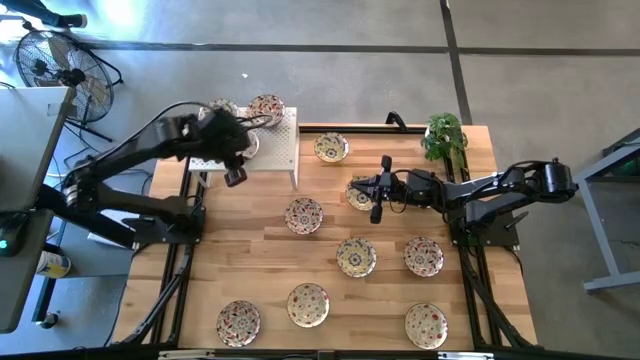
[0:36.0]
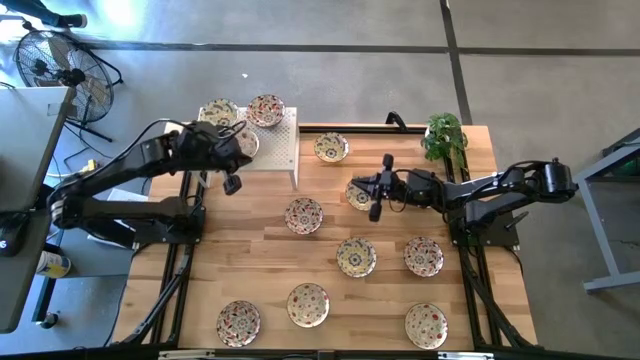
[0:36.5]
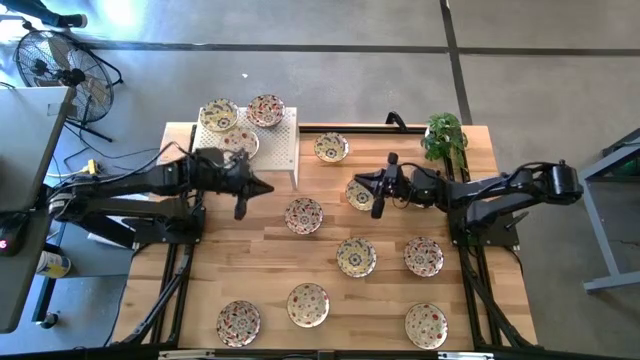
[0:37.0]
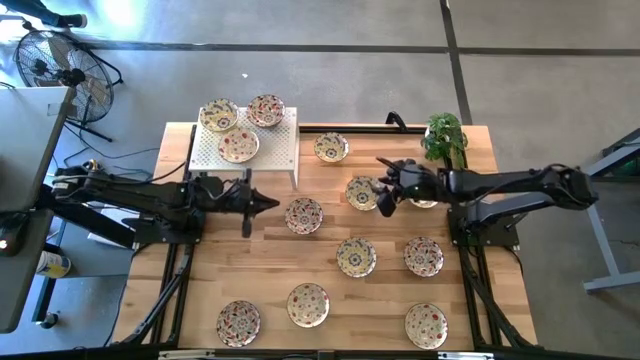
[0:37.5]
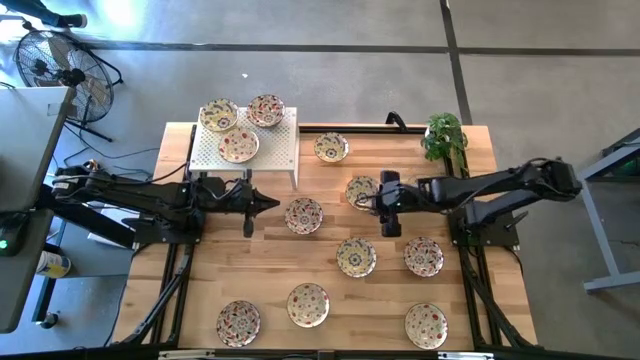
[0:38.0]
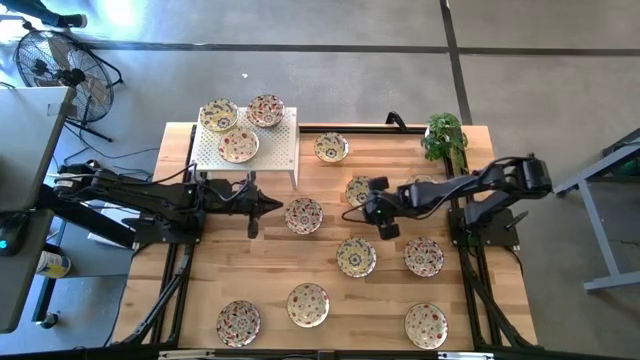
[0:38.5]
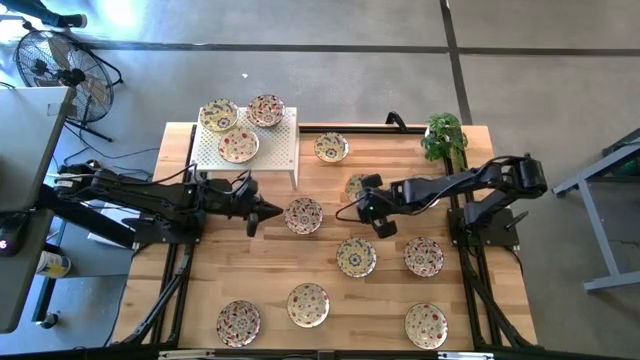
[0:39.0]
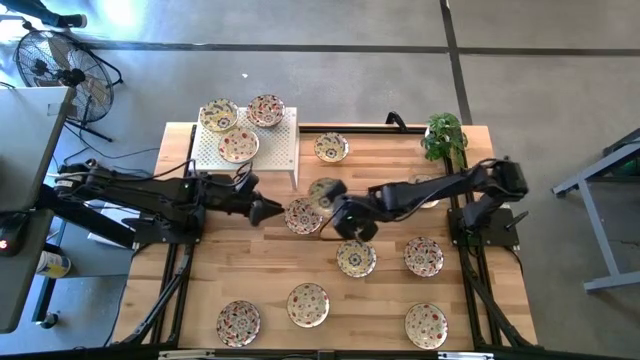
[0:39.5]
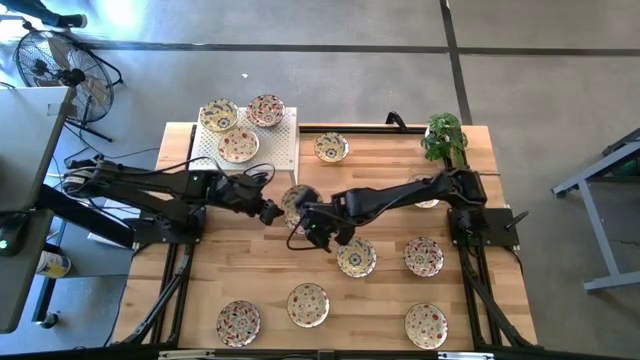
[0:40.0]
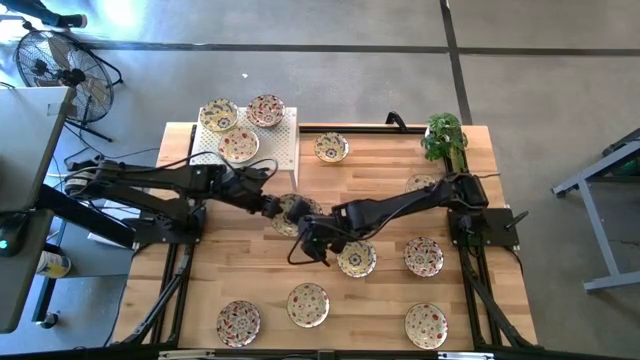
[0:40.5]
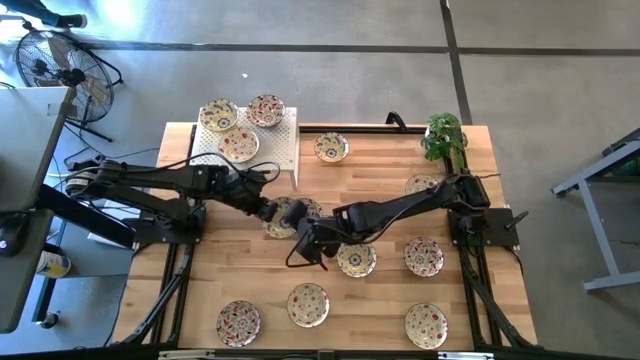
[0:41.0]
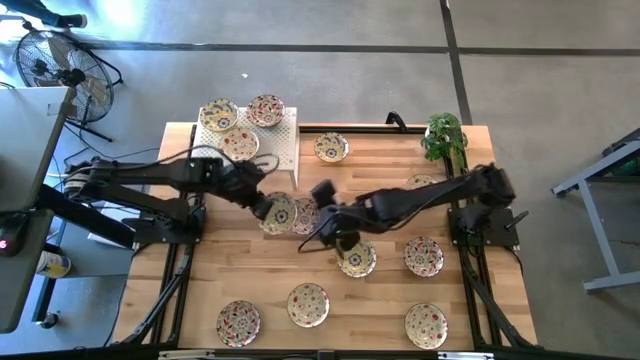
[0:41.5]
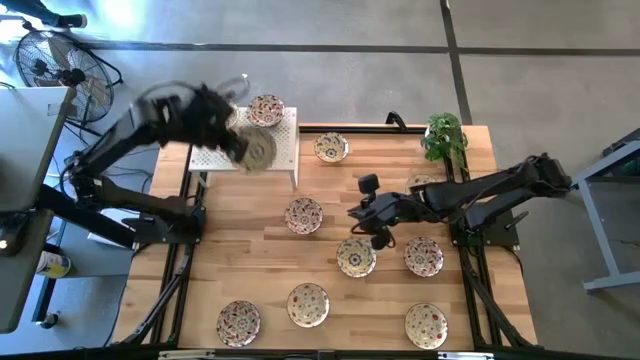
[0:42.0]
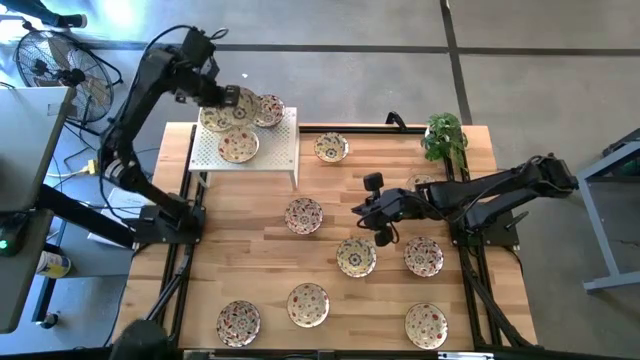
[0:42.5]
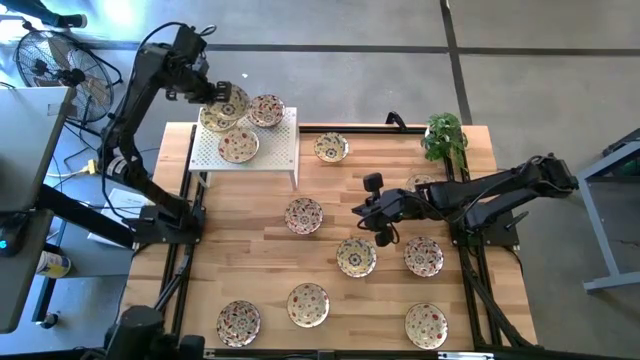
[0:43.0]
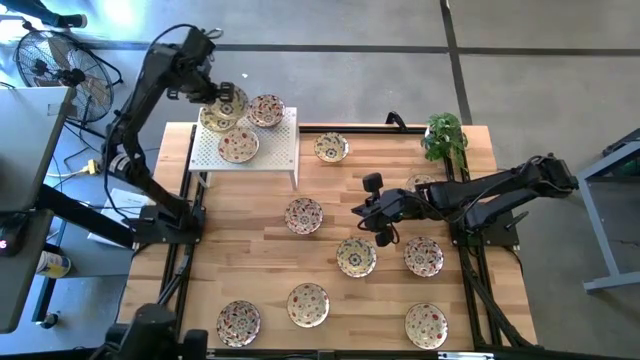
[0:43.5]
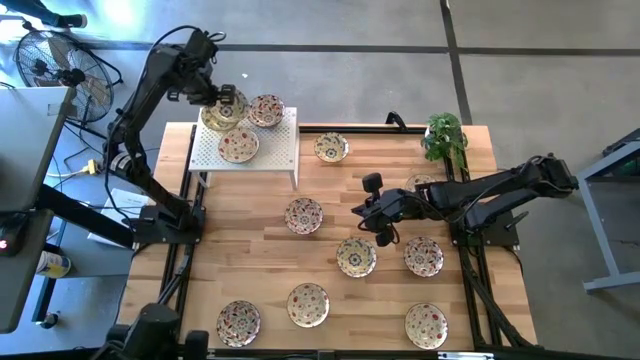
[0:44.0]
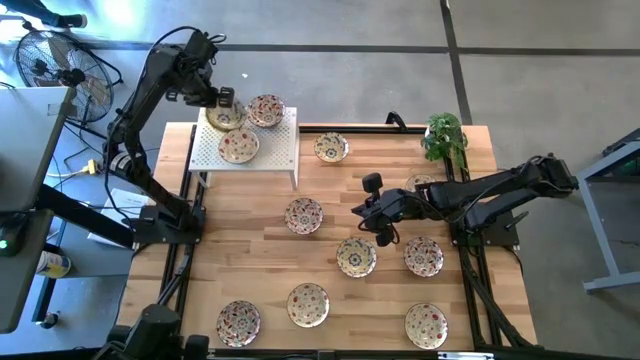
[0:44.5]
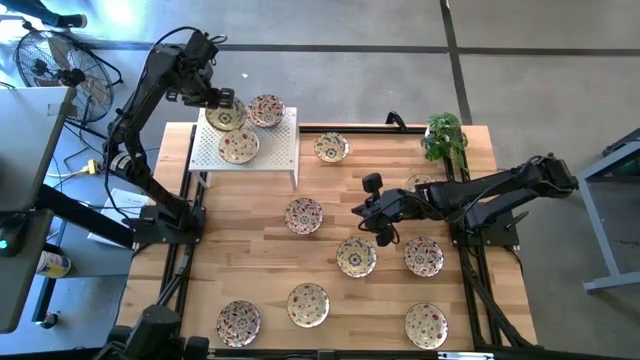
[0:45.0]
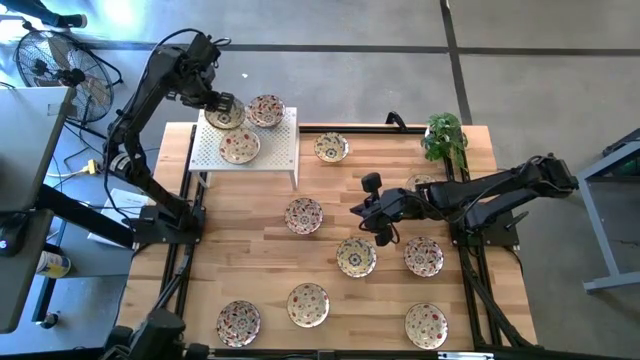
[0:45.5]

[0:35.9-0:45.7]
Task: Pick & Place Mini bowls
Stack the yellow patterned bowl on top of the yellow patterned bowl on the shelf

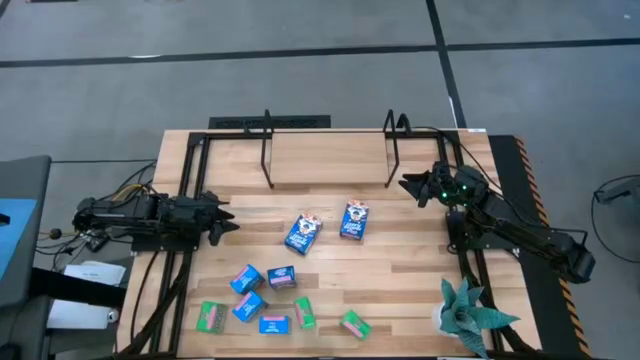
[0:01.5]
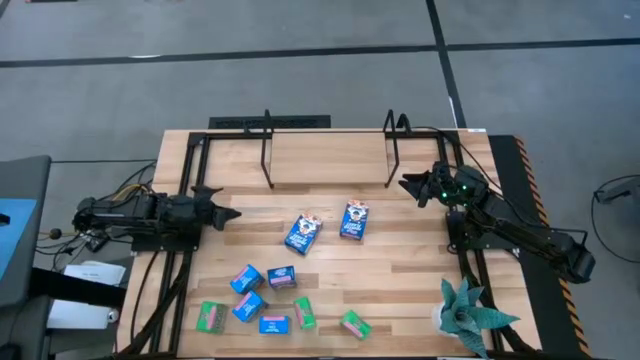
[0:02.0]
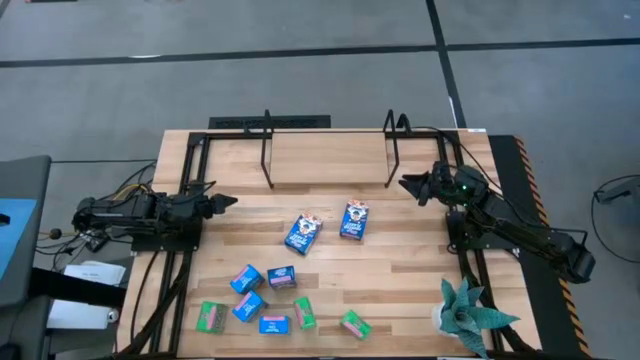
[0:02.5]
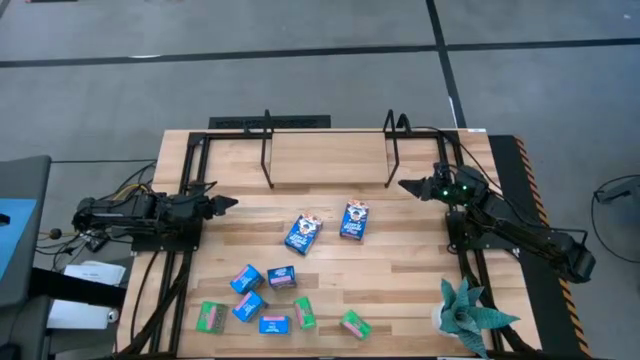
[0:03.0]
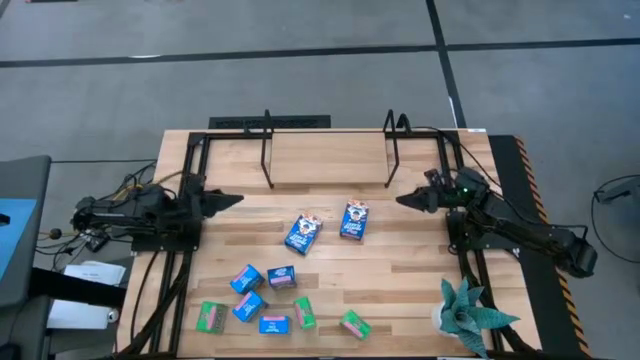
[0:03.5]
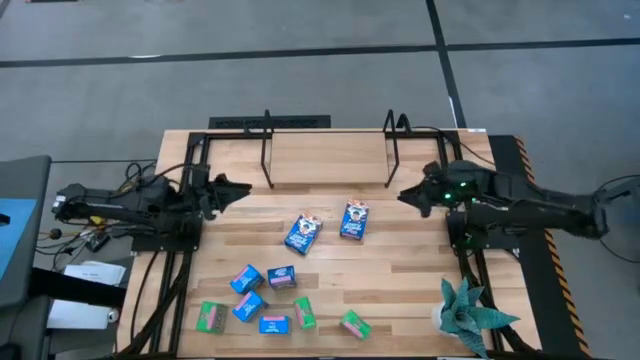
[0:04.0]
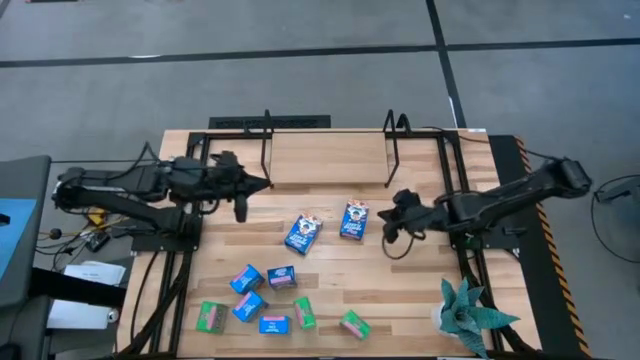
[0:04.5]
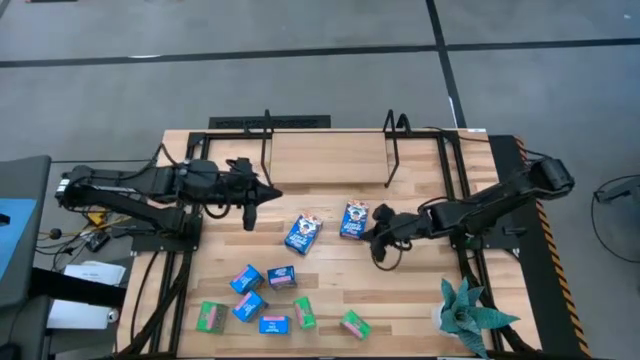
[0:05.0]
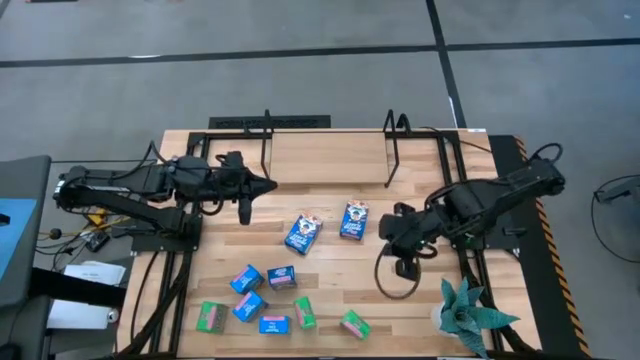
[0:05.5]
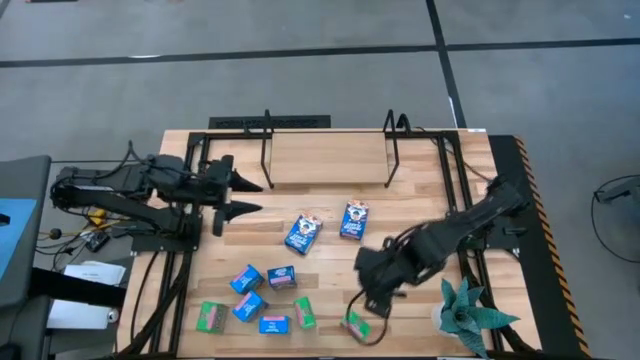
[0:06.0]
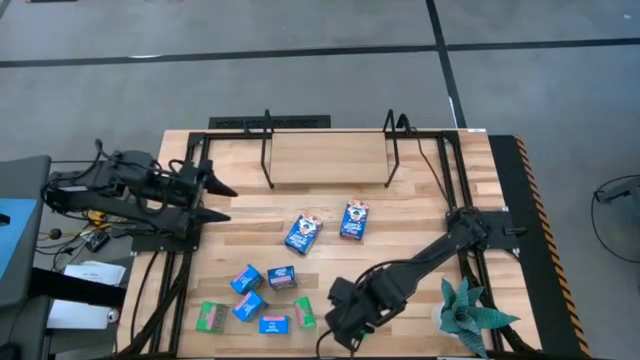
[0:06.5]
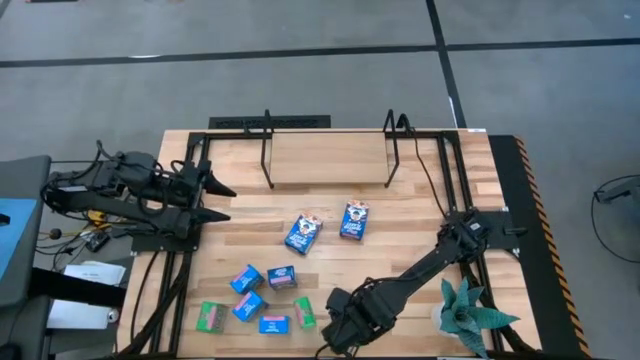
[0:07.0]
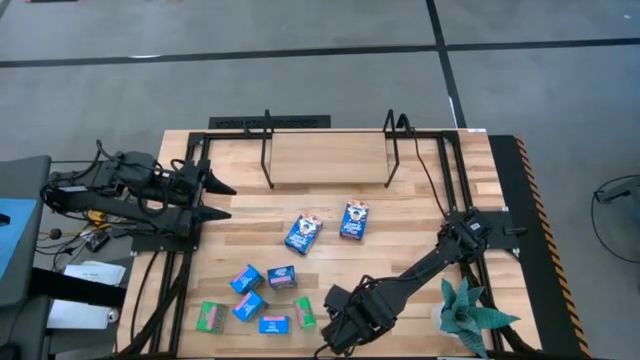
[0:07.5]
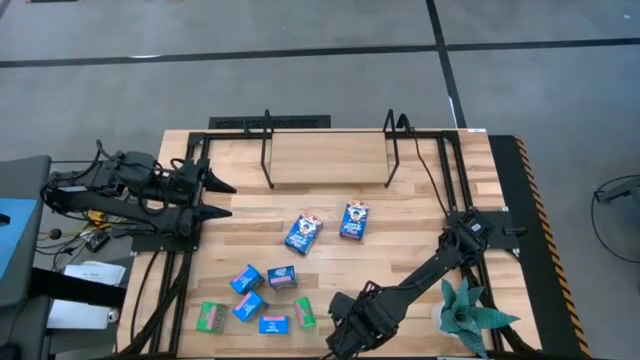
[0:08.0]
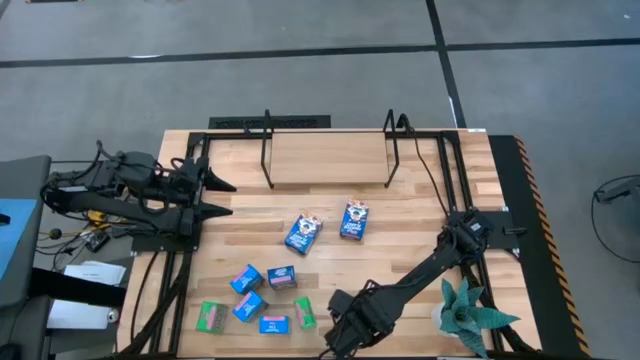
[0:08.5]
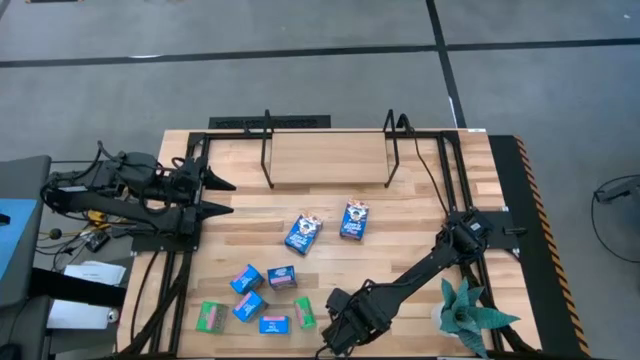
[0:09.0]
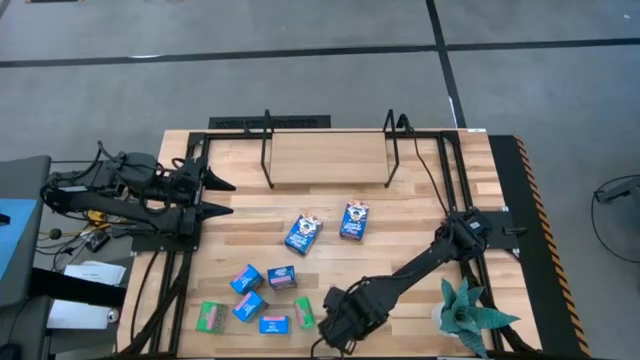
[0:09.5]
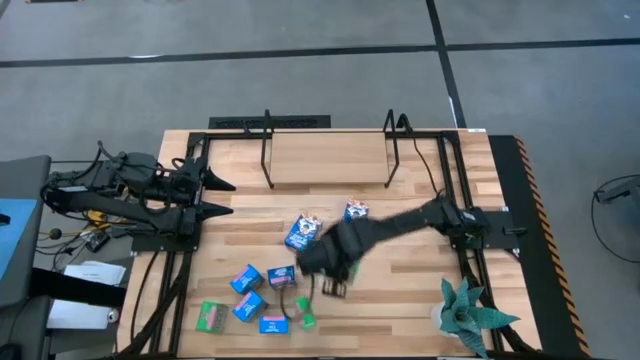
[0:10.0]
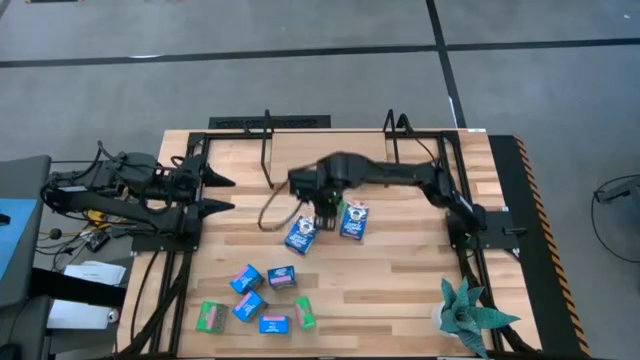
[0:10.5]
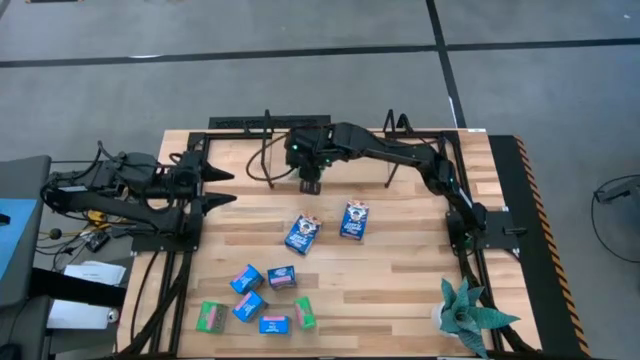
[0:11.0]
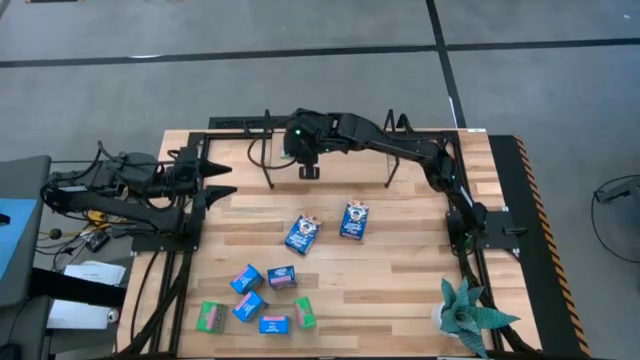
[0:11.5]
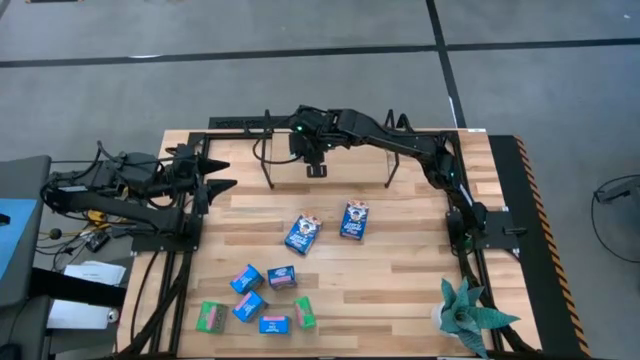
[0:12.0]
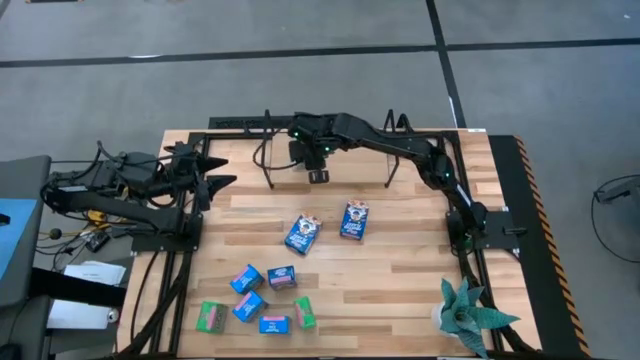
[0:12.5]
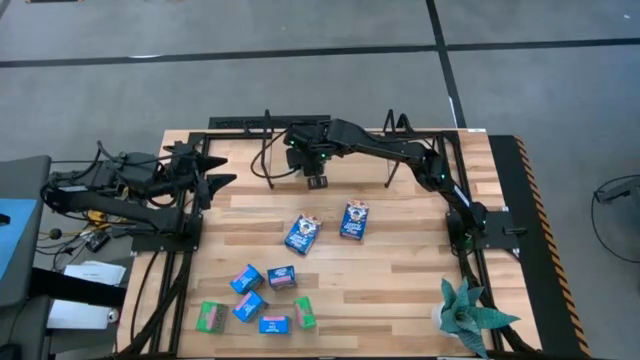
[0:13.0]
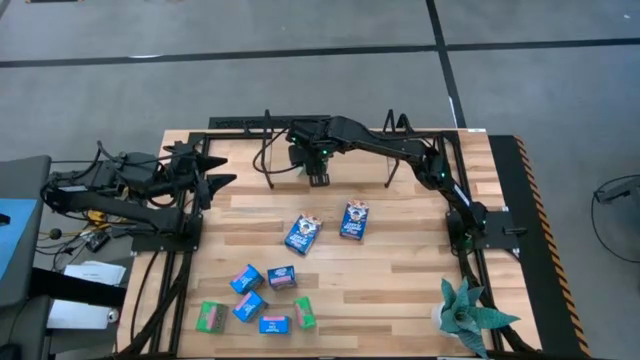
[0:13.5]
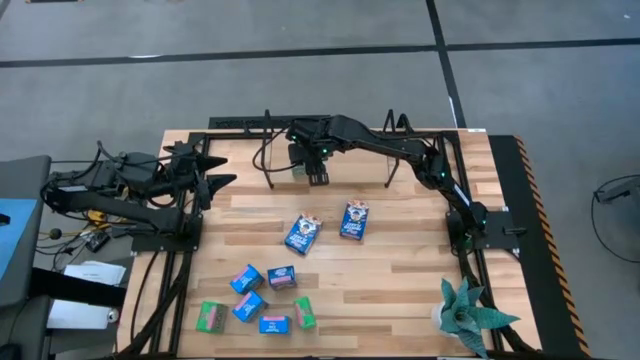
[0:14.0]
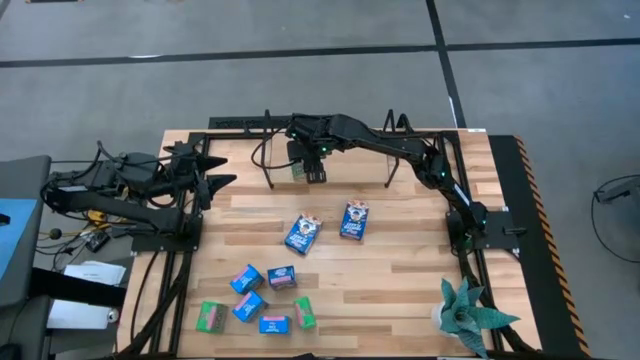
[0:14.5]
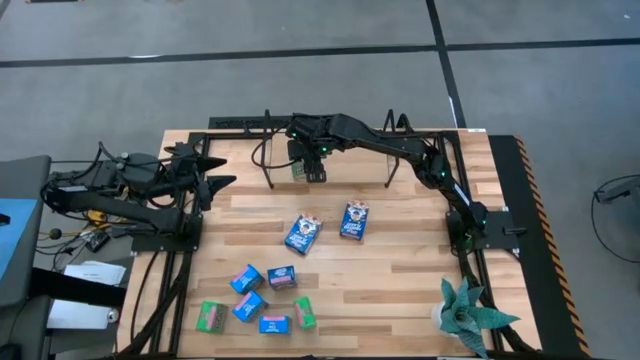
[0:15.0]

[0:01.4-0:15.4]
Task: Stack cereal on shelf
Put the right green cereal box on the shelf
